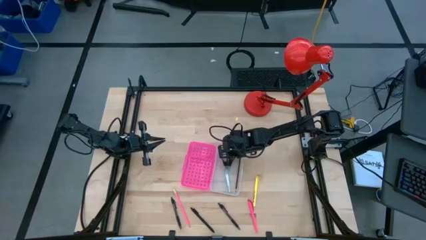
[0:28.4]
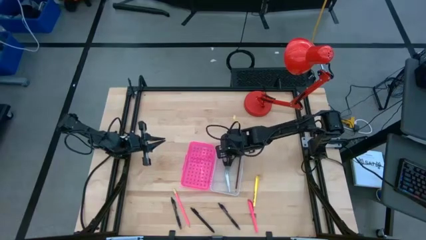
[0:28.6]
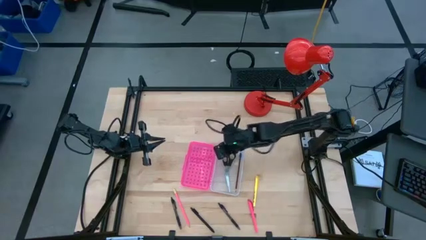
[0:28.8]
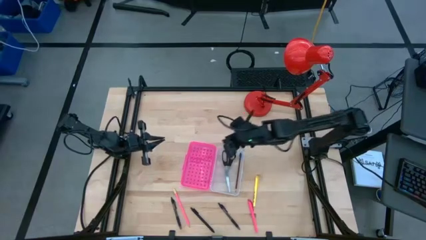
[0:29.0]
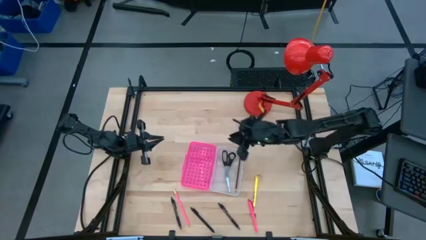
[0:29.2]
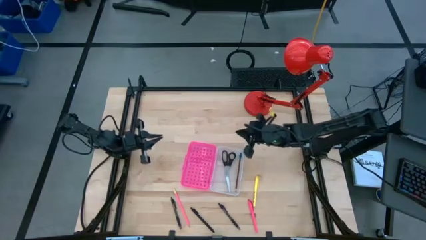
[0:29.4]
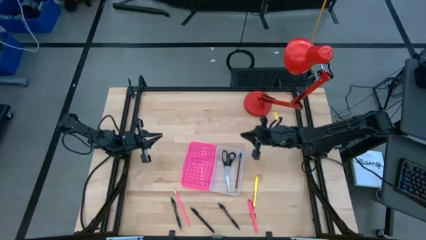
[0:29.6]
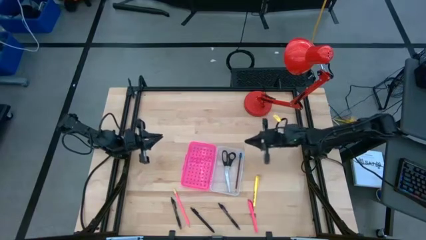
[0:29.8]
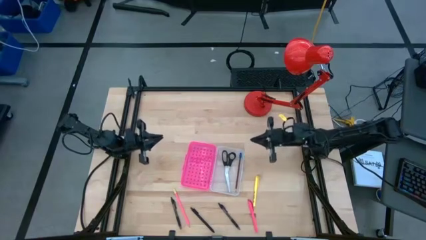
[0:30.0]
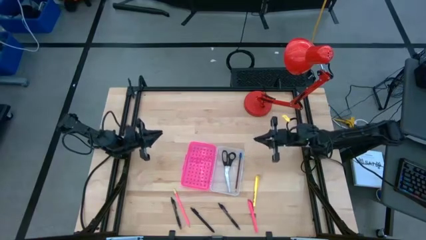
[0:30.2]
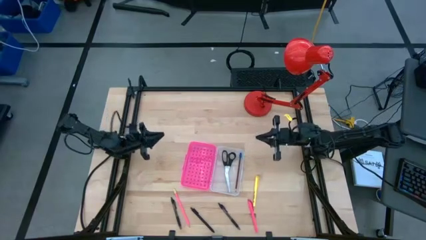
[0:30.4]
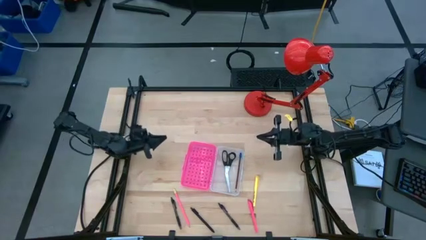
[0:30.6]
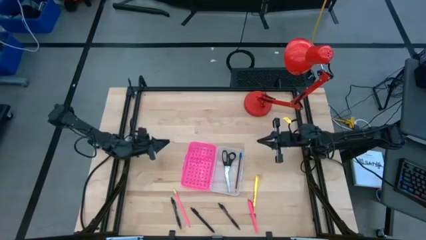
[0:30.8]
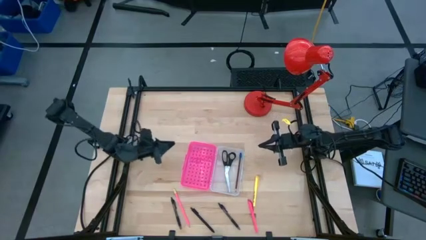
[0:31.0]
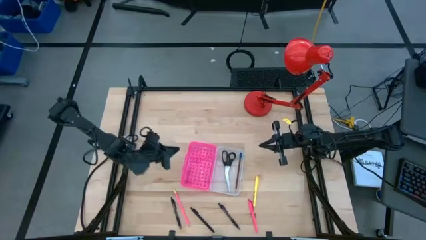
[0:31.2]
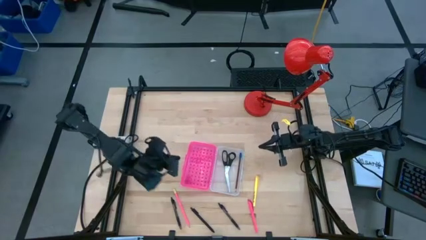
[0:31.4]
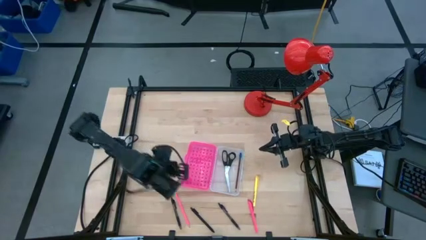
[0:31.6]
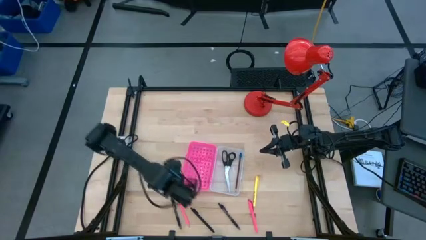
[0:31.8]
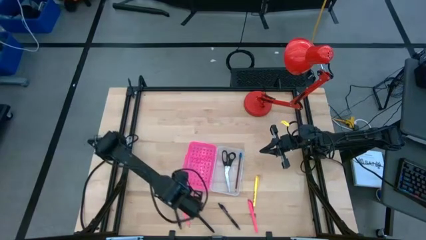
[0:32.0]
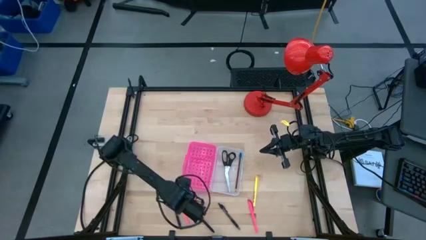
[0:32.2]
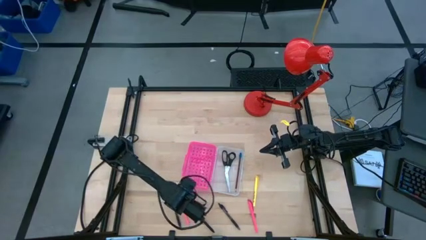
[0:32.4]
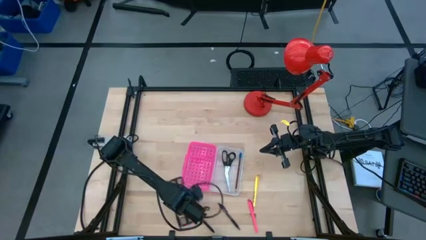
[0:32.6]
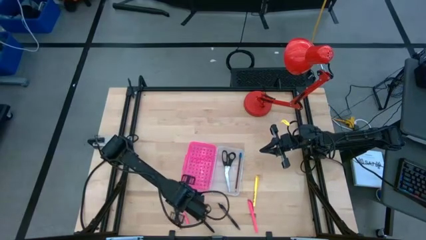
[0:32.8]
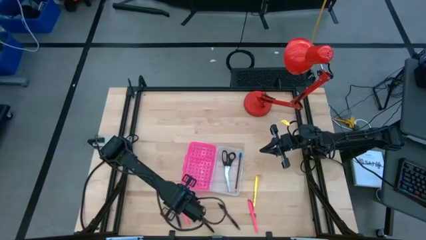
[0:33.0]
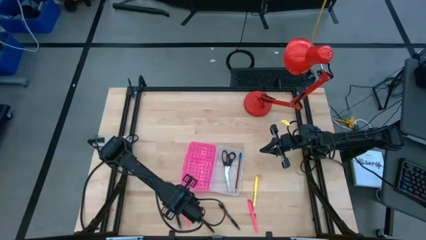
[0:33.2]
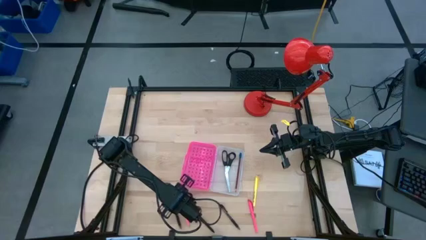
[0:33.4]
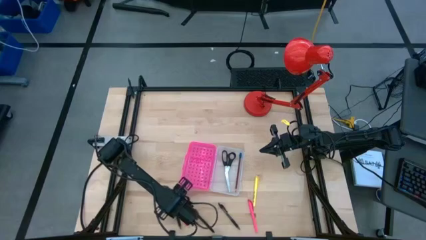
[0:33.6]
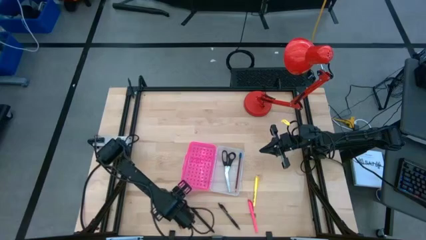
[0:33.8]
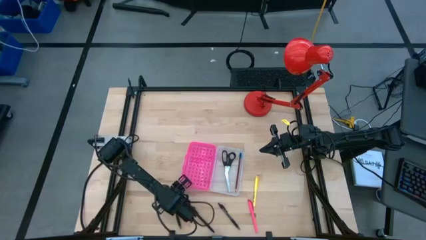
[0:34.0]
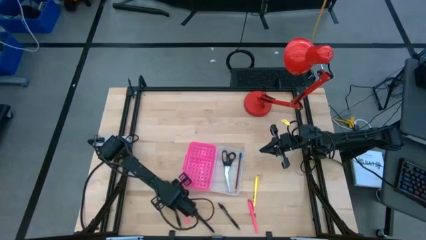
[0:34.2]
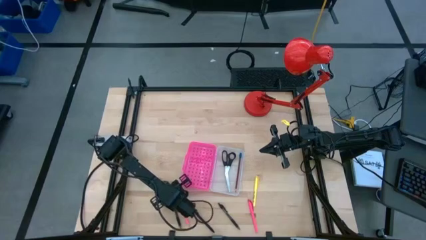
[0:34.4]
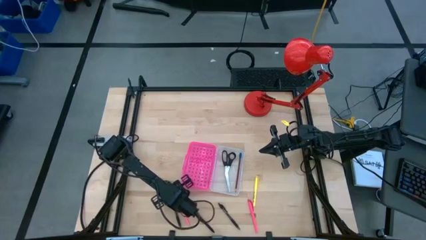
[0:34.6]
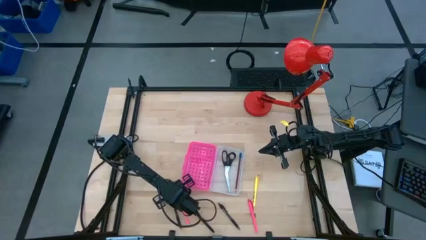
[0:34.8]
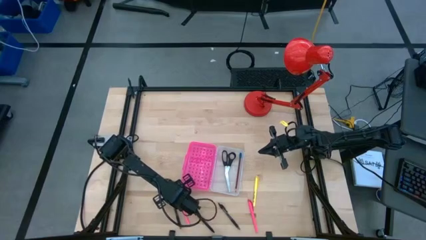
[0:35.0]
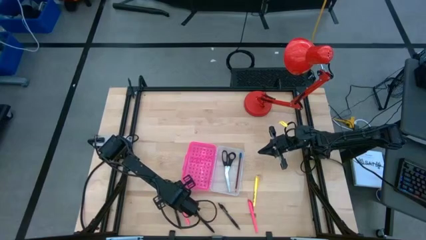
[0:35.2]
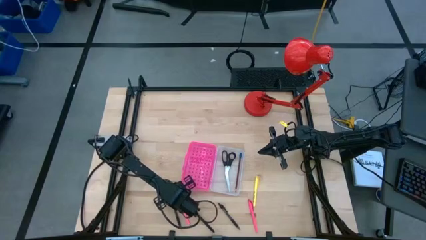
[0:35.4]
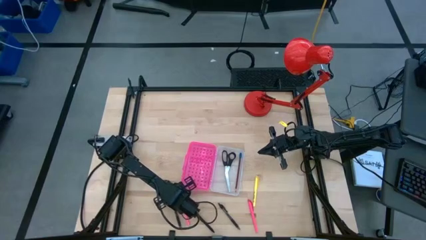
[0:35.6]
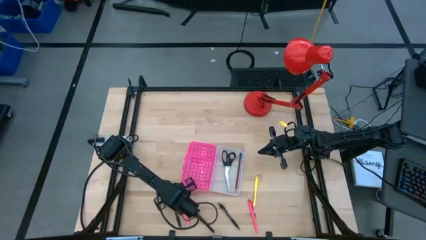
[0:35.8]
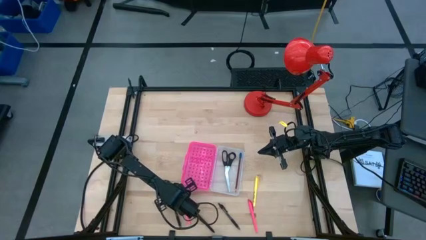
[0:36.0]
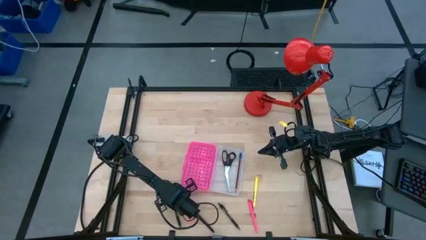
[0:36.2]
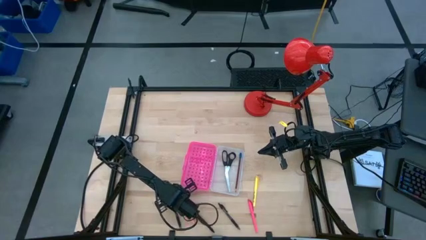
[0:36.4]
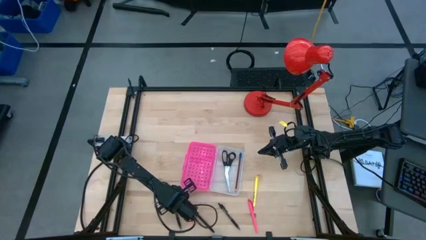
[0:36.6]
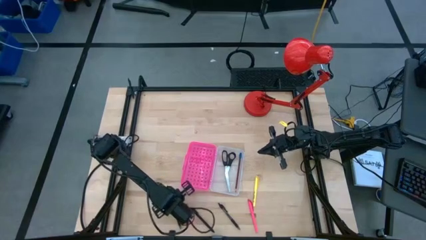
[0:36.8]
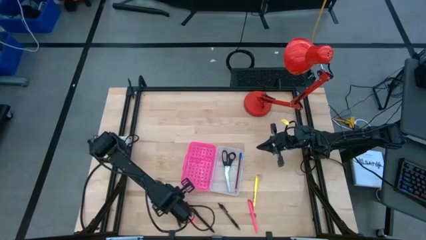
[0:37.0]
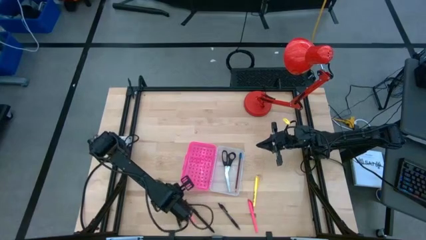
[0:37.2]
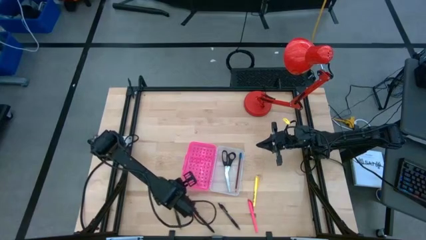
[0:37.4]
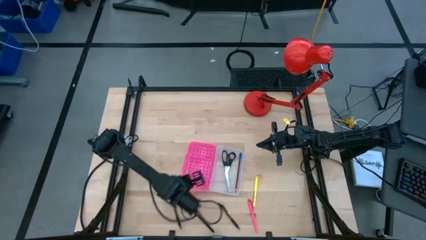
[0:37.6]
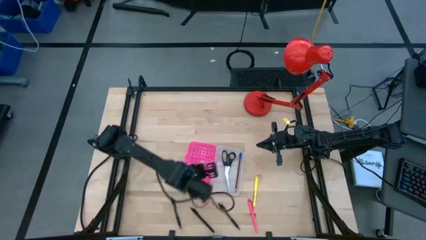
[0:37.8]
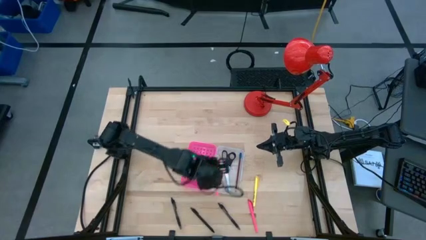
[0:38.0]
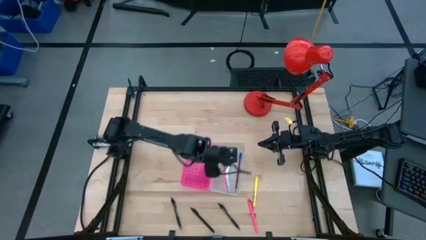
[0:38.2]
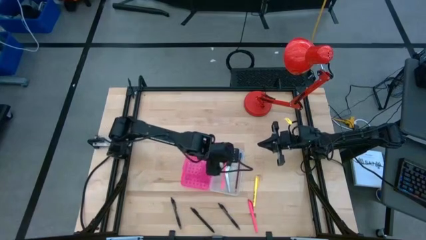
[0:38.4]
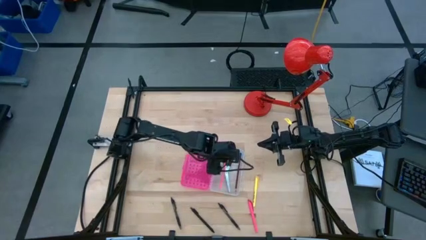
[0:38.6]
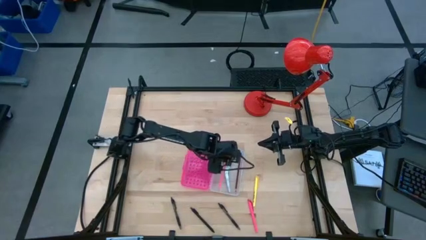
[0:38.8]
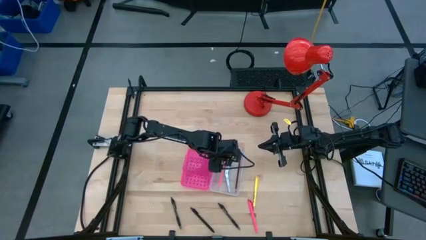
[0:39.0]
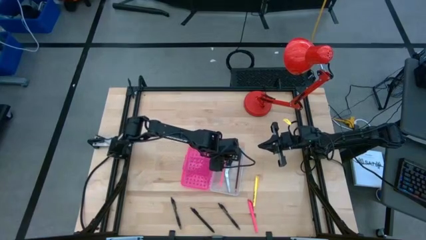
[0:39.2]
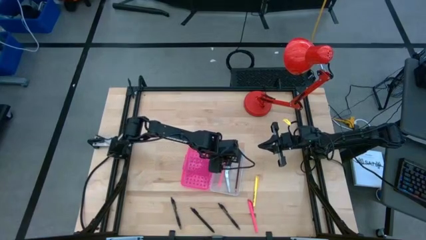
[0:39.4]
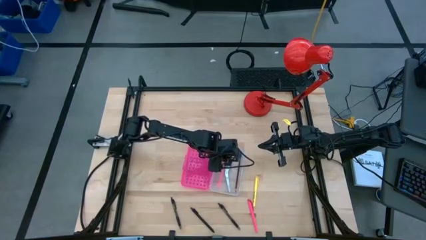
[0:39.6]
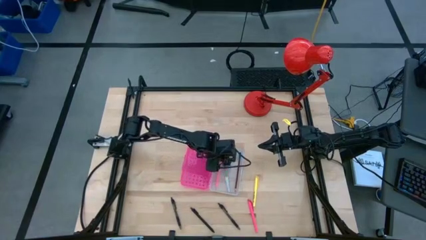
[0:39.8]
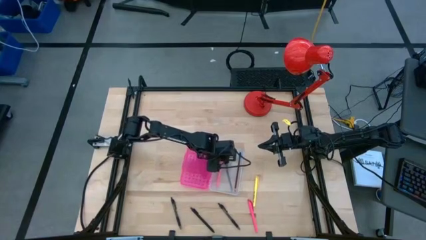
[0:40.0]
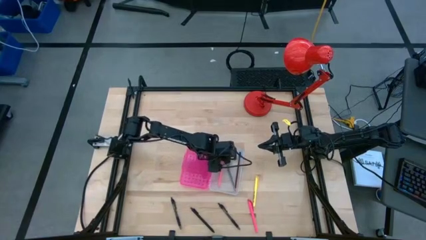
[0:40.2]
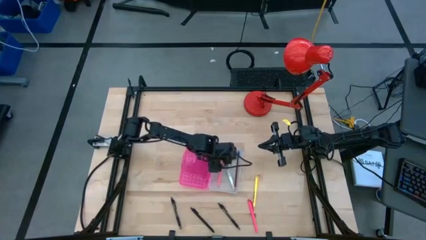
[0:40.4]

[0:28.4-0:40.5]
Task: Pick & place school supplies into a supply box
Put the pink pencil into the pink box

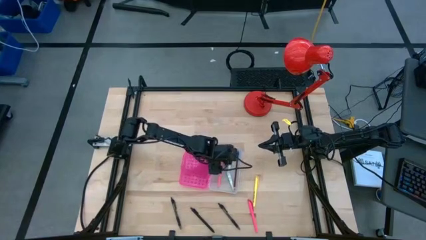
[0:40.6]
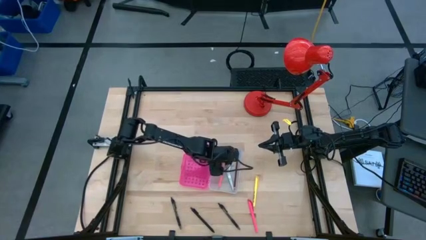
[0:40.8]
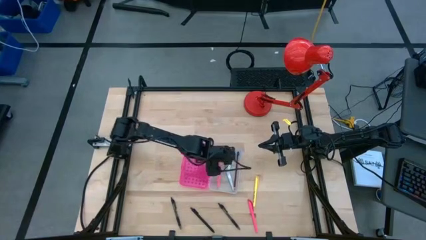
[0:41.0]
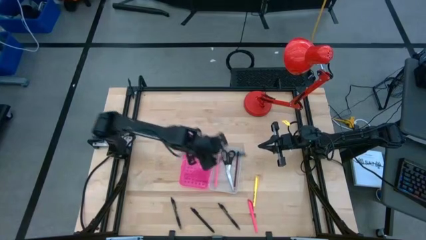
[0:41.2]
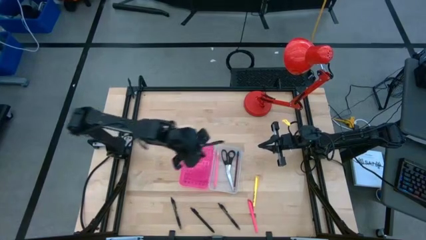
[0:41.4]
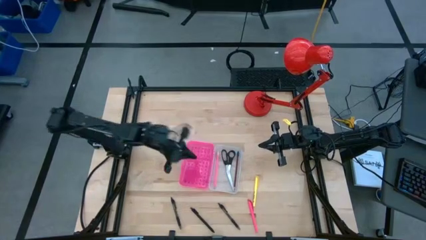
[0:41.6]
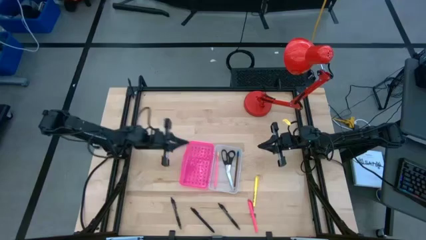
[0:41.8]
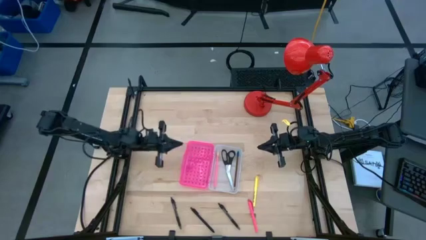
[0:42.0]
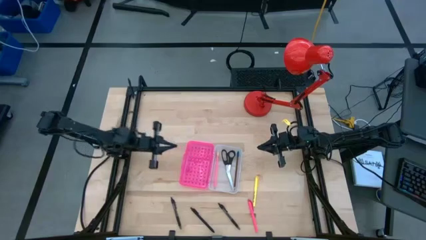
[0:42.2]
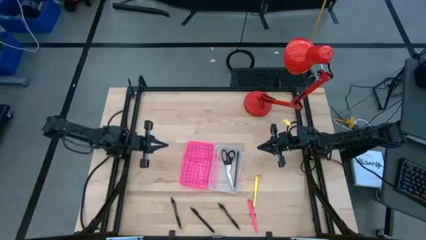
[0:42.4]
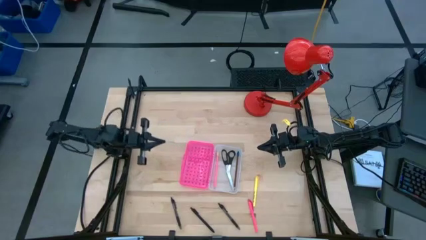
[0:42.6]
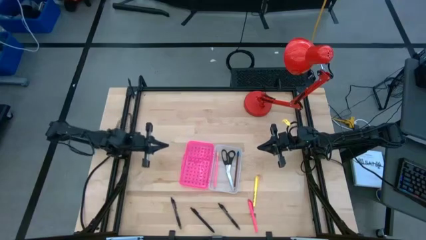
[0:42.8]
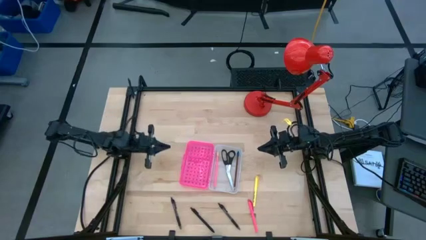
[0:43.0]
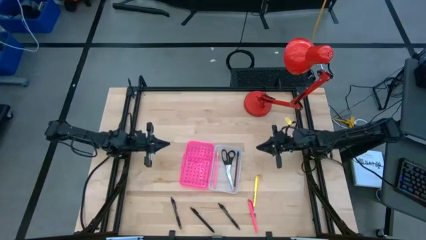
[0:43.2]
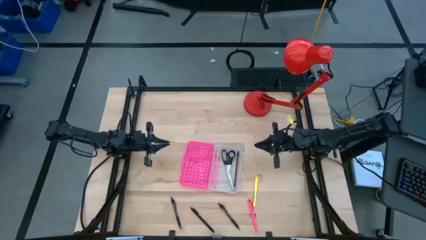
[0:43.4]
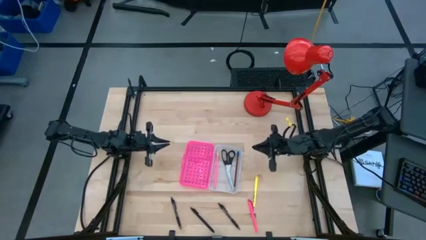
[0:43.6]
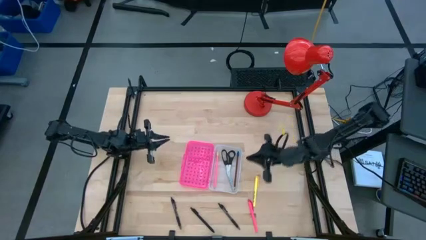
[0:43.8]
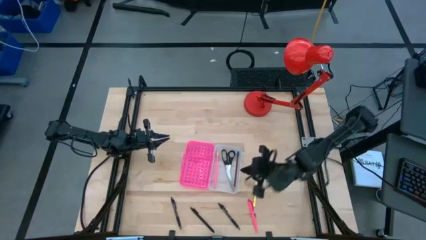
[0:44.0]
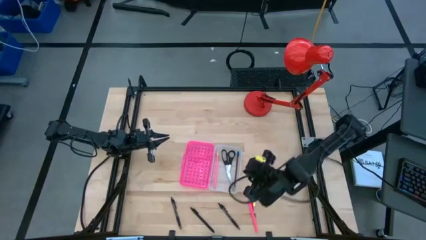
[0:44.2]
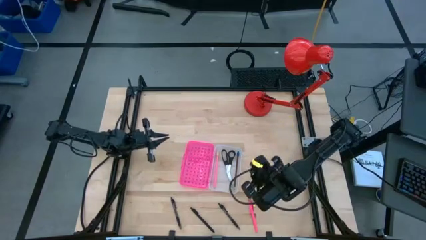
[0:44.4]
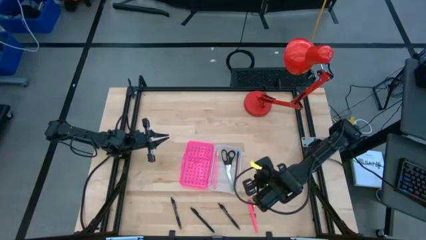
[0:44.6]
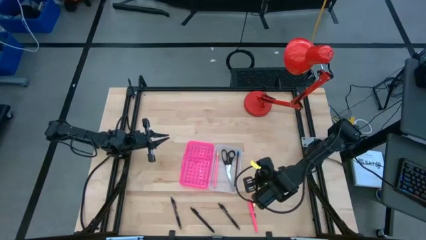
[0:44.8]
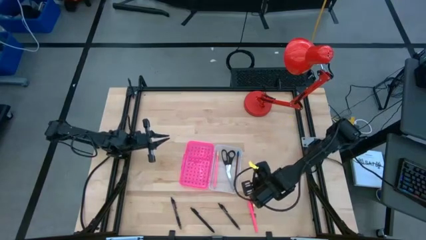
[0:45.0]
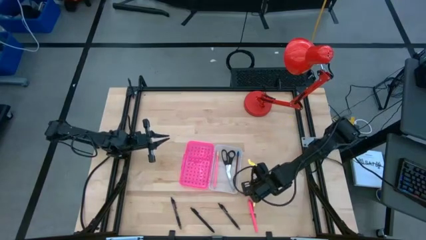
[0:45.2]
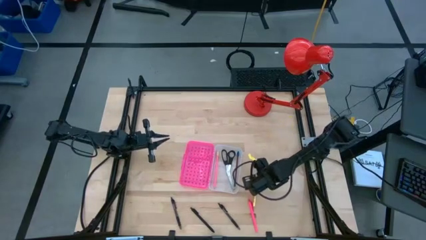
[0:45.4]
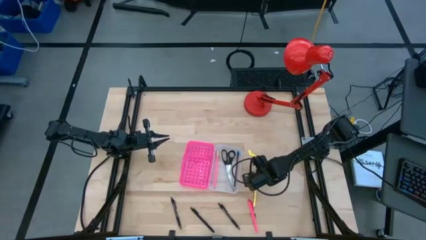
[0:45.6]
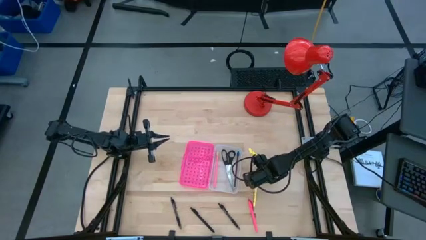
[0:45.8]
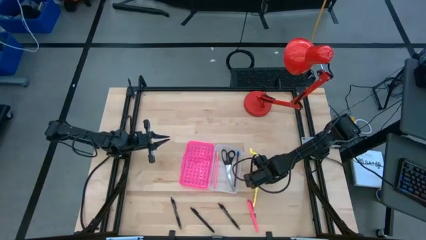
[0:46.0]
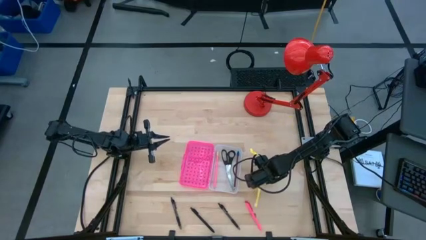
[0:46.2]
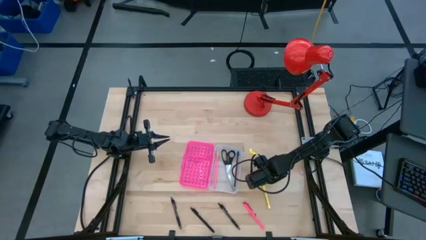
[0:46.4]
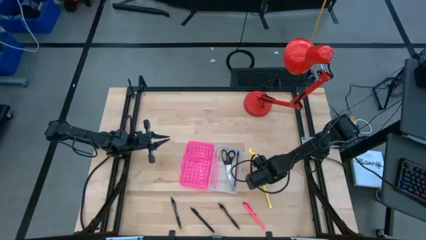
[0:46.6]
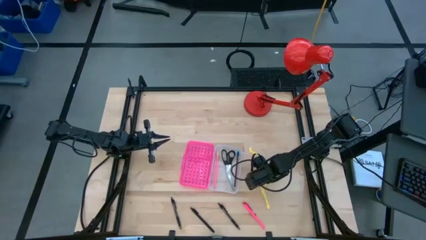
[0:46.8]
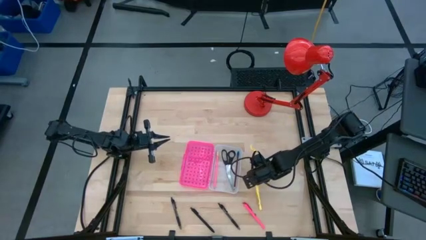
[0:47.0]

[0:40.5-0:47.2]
Put the yellow pen into the pink box
